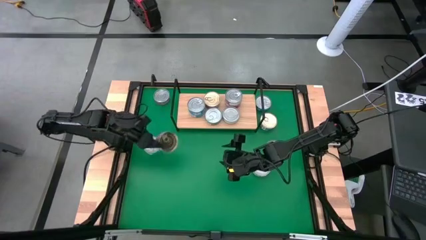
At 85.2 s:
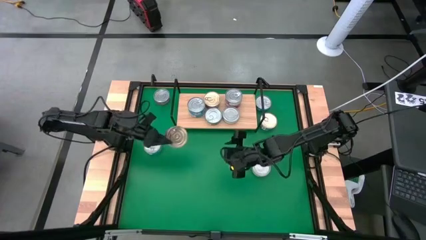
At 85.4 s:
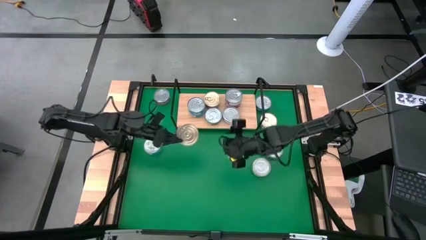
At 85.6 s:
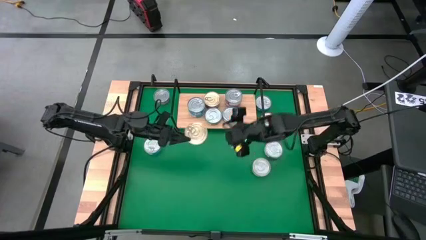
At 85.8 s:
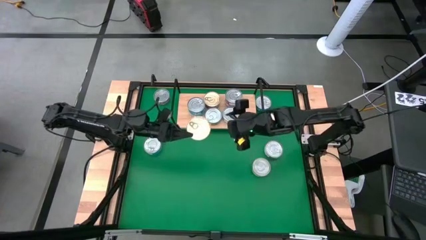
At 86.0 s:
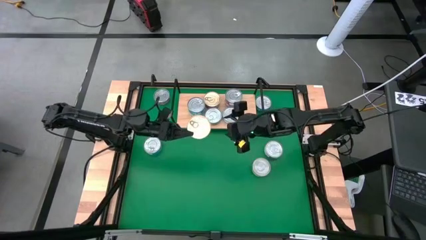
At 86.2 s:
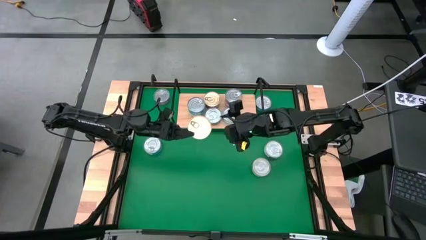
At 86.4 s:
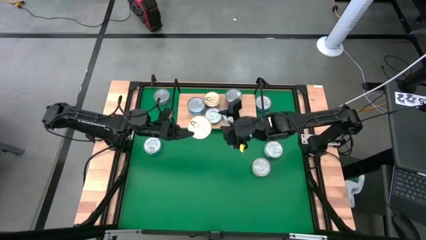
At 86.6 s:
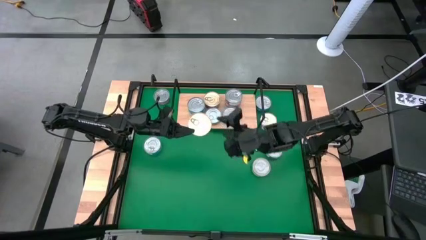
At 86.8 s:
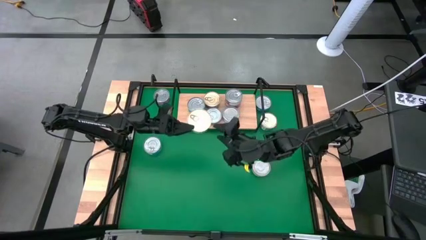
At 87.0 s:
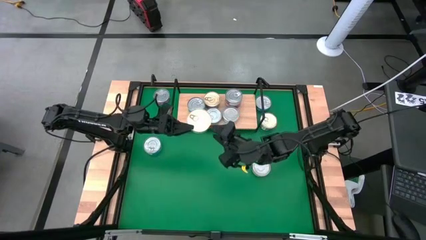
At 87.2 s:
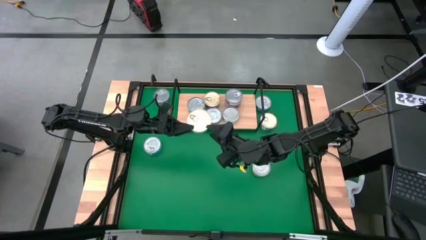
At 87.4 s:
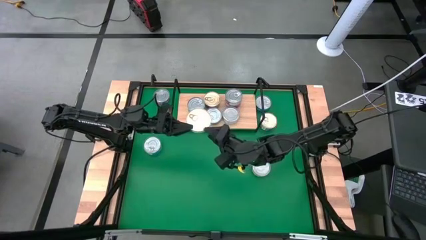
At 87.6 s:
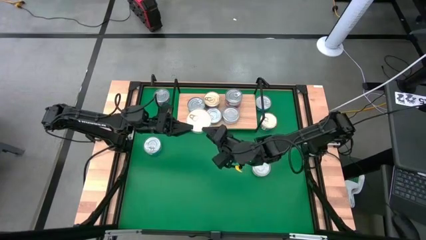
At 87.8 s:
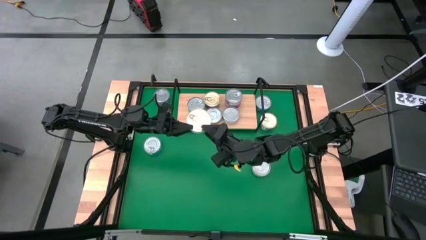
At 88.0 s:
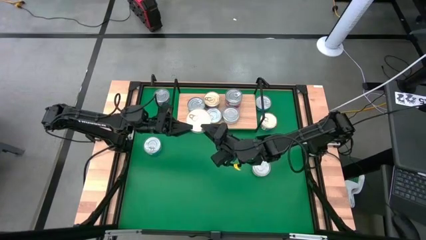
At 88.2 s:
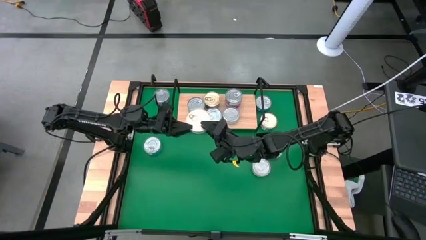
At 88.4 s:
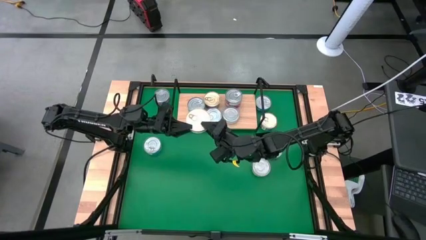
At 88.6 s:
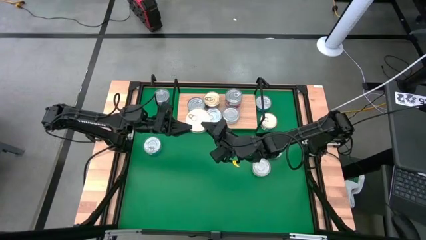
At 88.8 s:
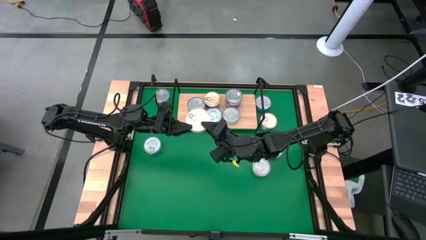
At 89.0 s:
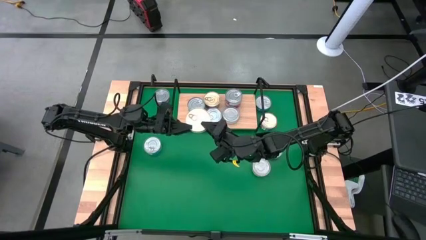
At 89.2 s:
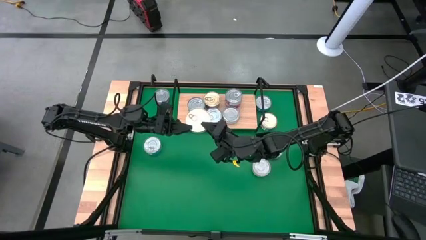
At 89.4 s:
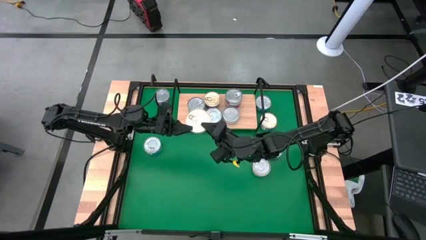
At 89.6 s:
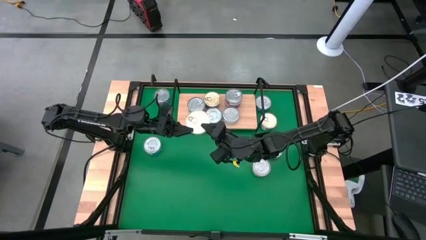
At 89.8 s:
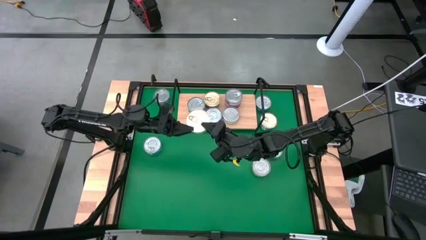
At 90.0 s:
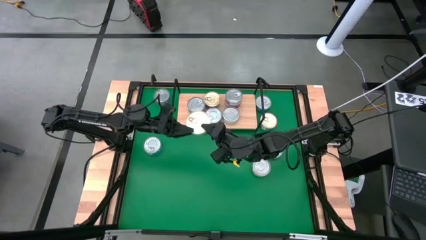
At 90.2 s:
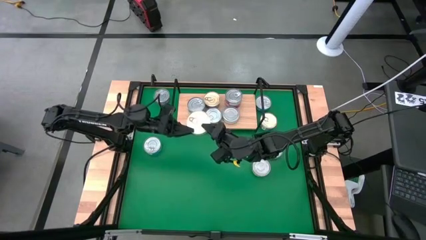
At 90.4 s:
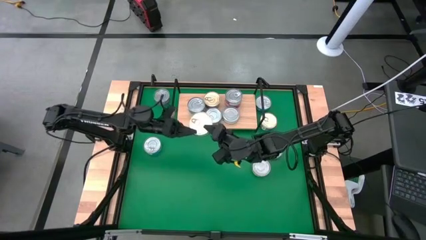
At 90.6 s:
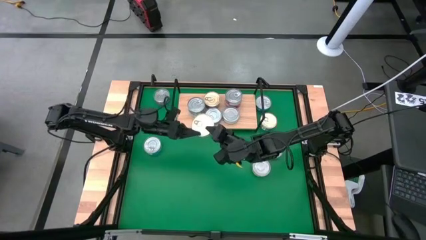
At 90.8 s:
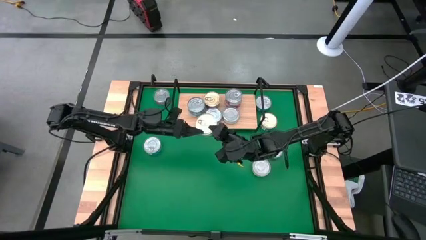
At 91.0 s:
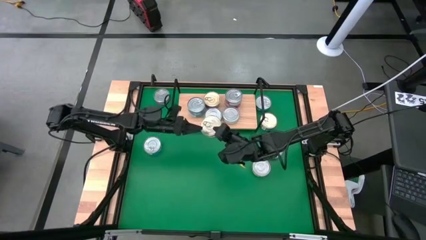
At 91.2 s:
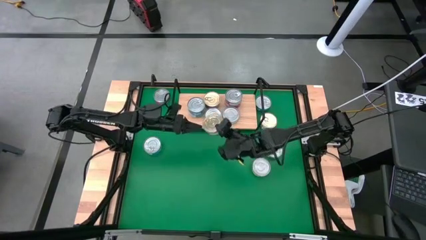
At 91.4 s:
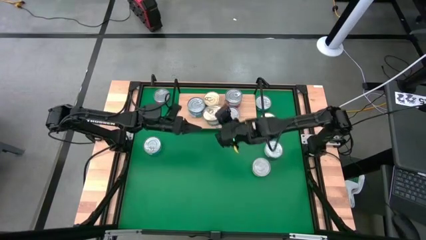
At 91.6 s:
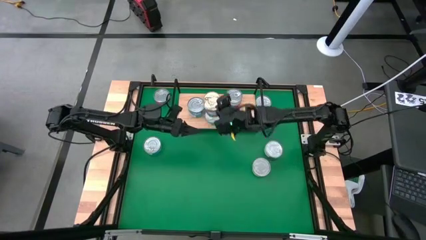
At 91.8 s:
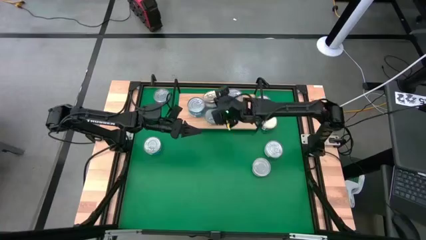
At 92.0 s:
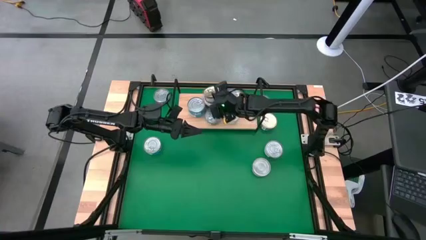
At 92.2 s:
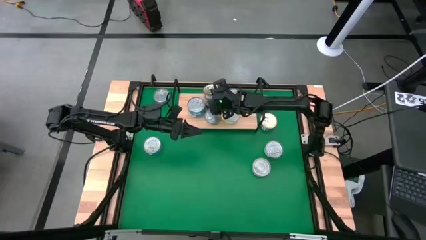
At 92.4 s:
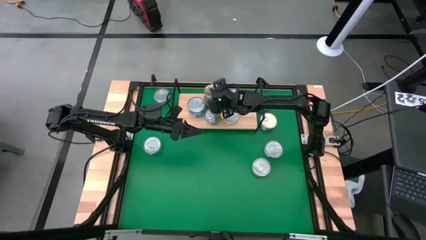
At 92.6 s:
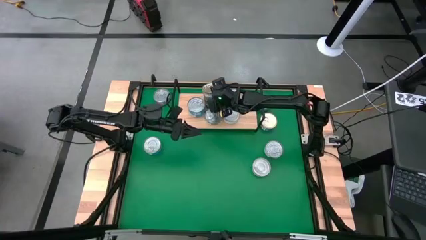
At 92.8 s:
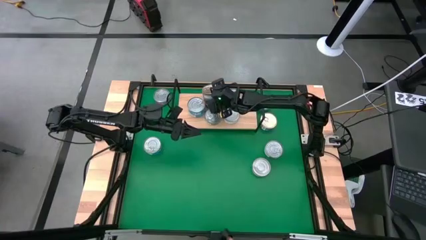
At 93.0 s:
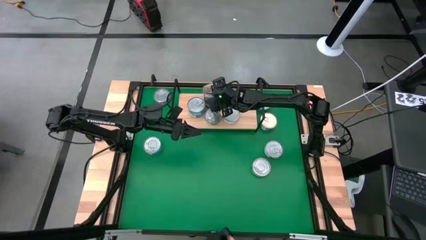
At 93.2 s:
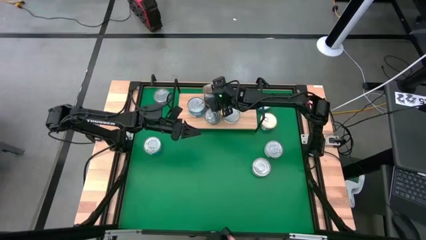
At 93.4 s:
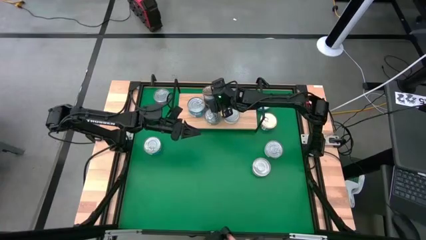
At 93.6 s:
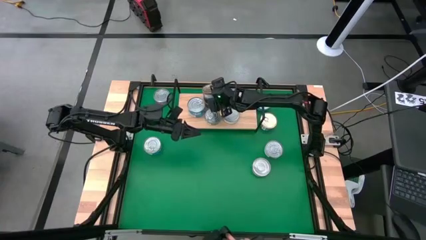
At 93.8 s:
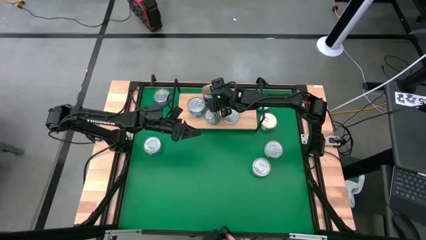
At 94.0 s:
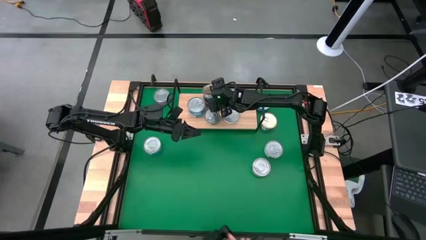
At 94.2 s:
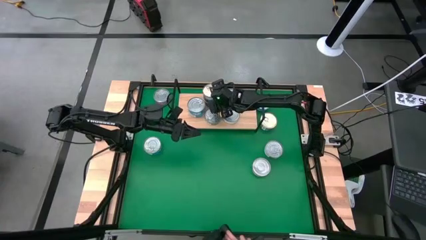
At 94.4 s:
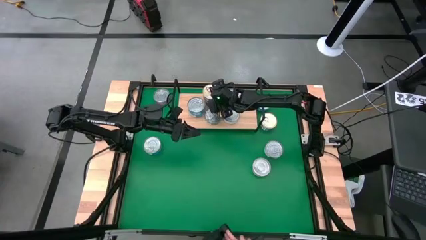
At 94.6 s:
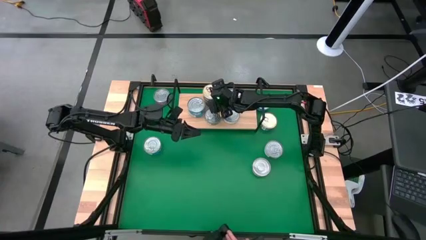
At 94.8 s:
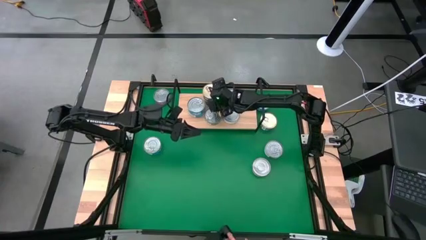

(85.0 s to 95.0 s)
Task: Stack canned seafood by type on shelf
Stack the blue pink tuna can on top of the blue pink tuna can on the shelf

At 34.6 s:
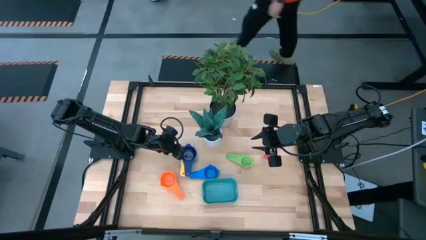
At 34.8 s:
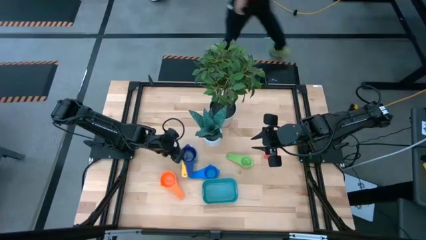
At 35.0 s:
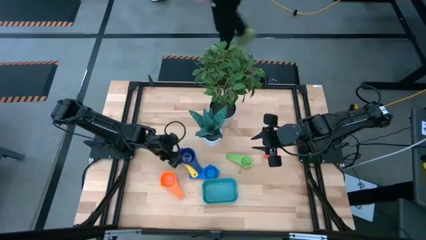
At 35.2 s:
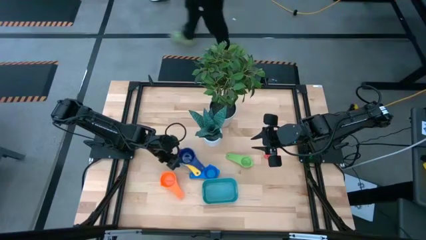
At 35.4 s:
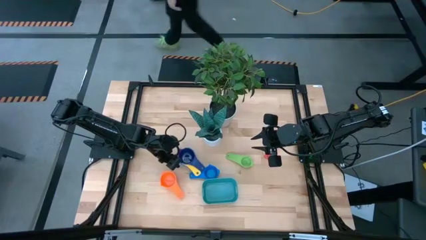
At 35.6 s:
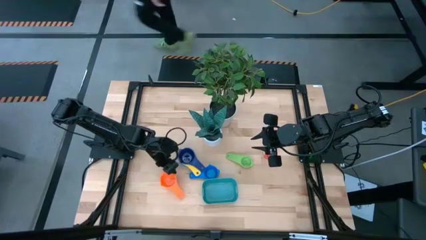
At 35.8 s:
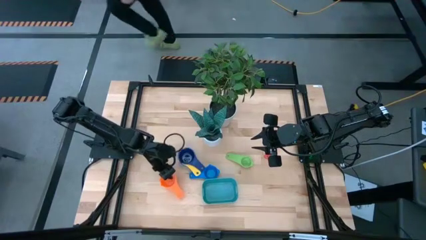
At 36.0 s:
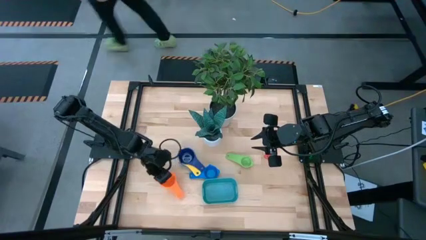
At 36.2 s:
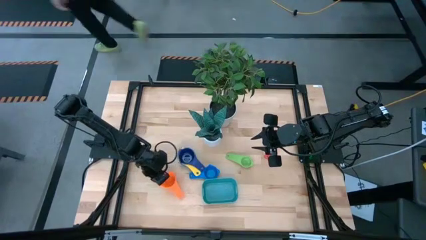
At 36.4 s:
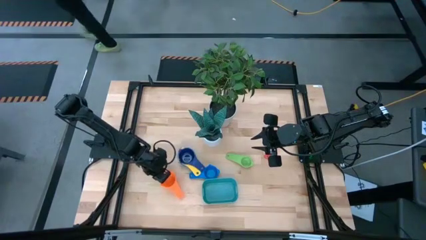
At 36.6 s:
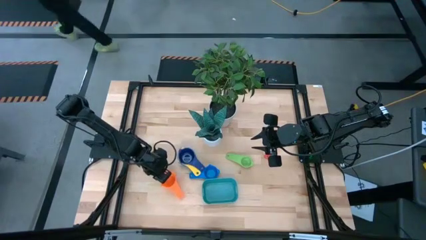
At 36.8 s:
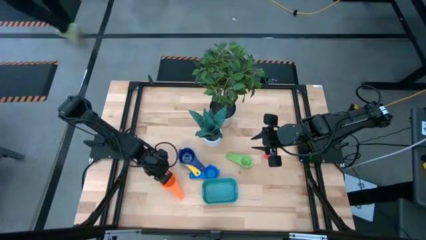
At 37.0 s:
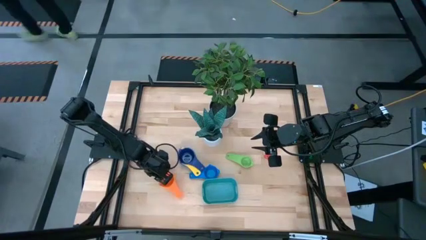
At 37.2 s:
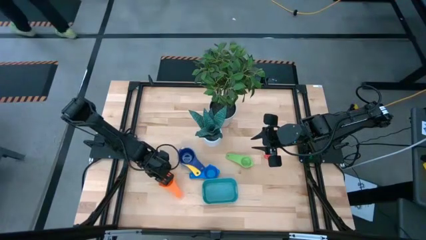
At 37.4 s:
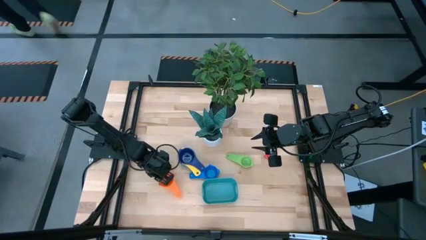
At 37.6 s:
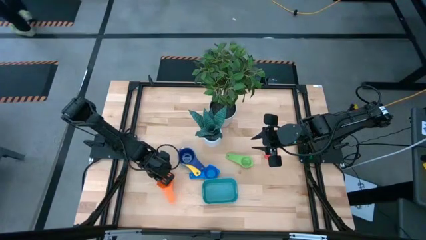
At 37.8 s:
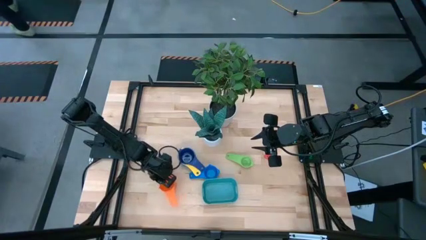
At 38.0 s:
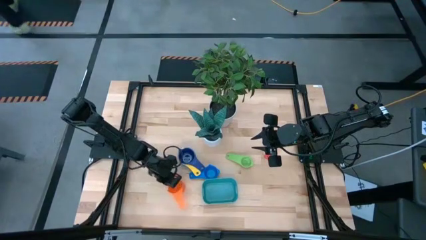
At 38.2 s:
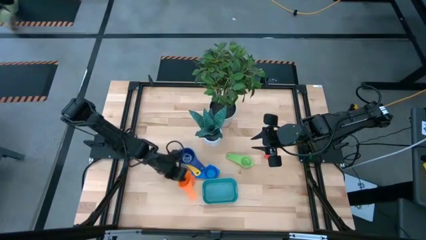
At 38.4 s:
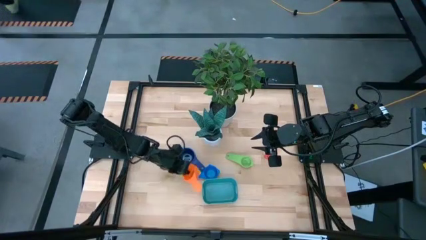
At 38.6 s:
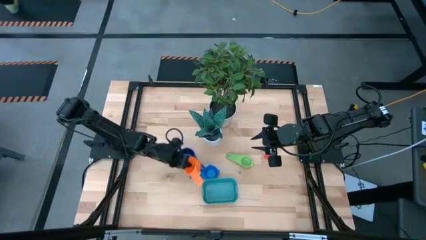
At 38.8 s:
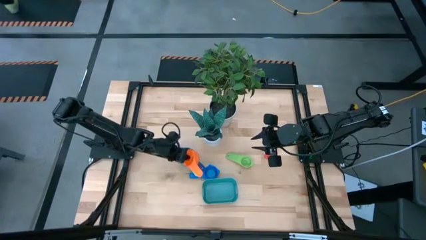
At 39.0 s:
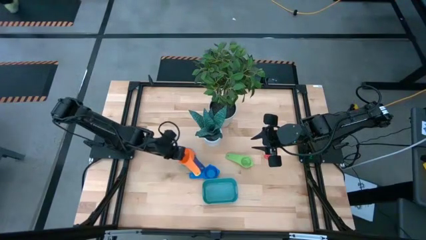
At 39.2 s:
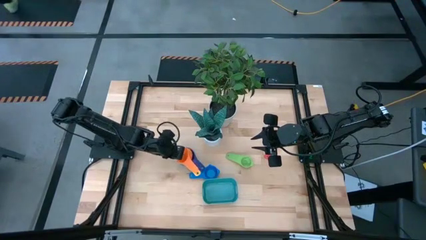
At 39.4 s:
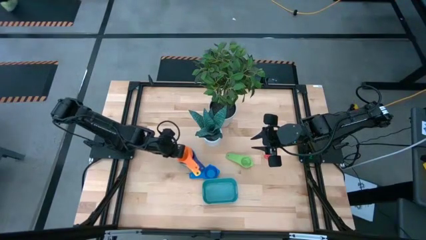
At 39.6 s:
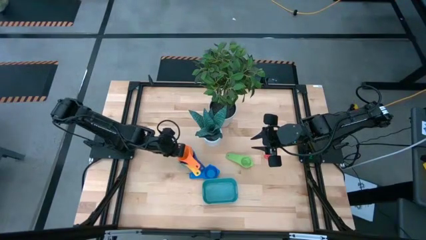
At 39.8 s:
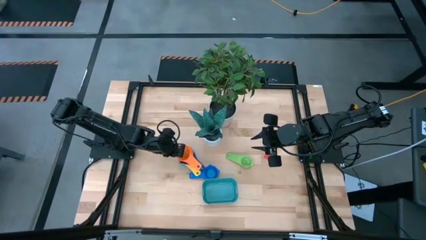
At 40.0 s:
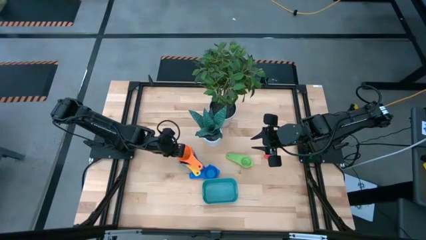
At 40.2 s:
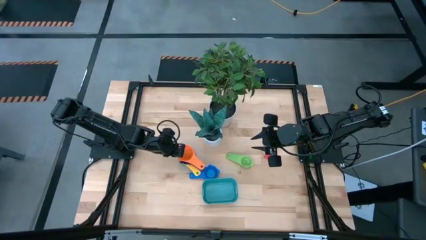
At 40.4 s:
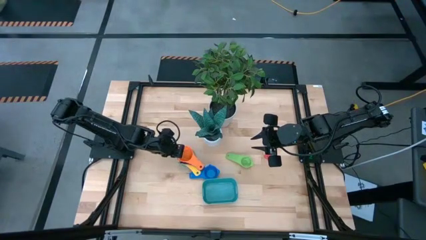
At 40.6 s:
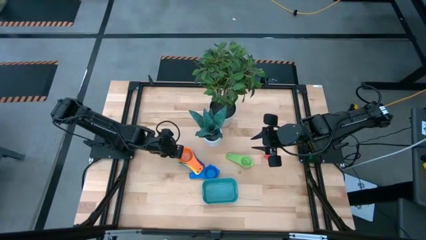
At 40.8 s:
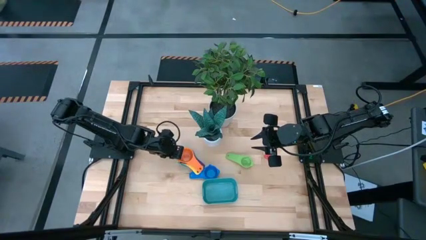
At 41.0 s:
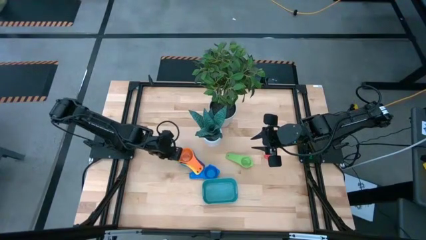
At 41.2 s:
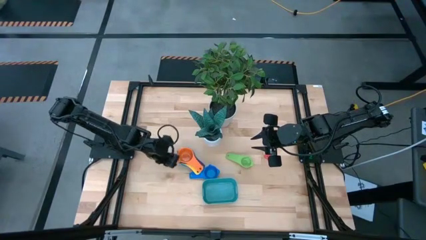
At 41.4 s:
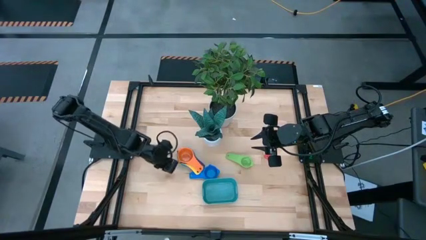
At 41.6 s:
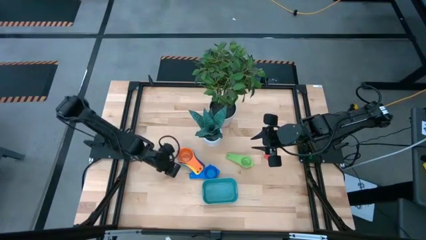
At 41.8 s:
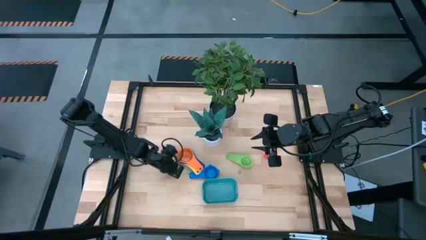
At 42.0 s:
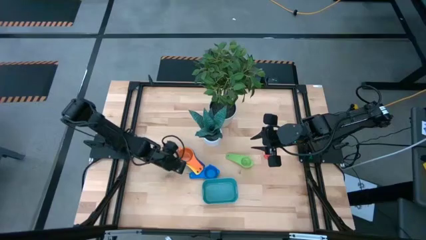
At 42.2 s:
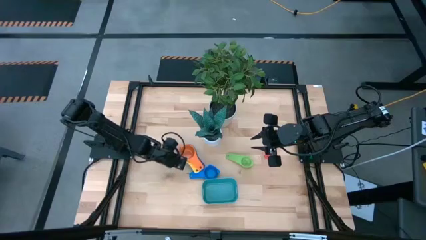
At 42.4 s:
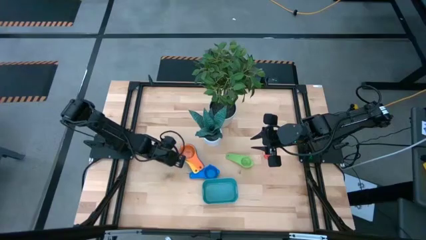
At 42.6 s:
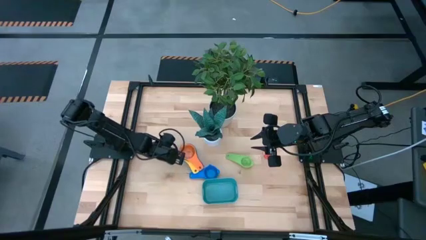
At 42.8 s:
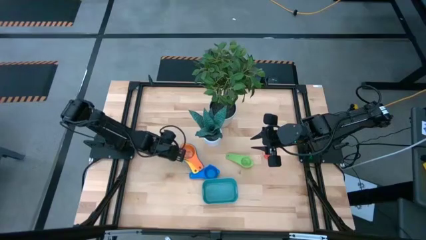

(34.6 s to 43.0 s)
Task: Nest measuring cups in basket
Stack the orange measuring cup on top of the dark blue measuring cup
